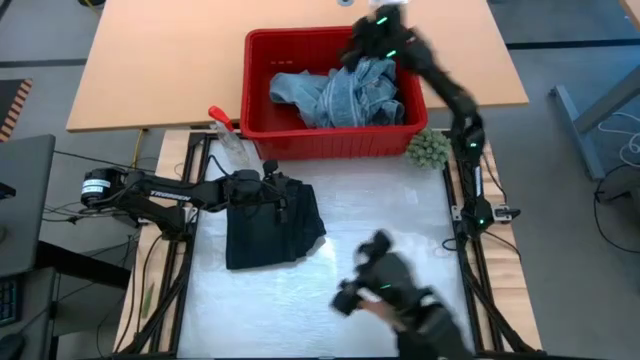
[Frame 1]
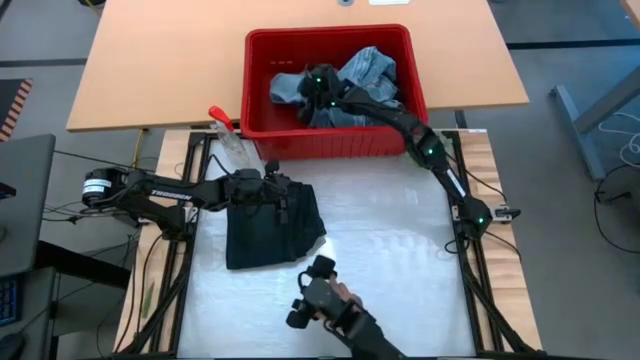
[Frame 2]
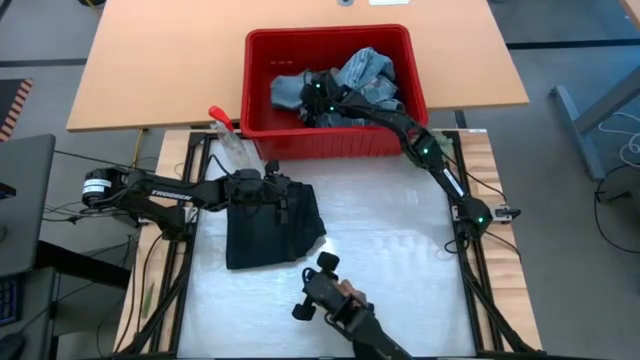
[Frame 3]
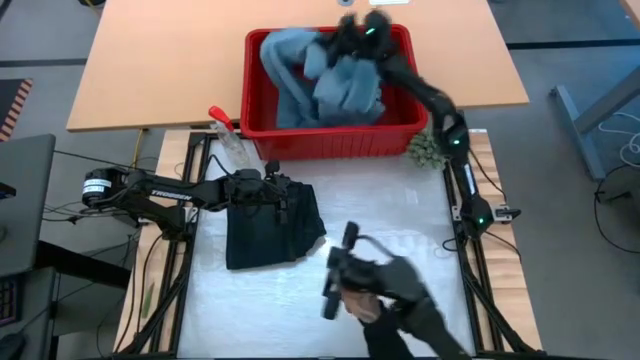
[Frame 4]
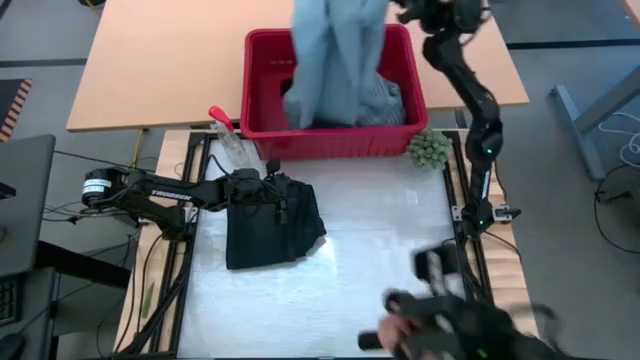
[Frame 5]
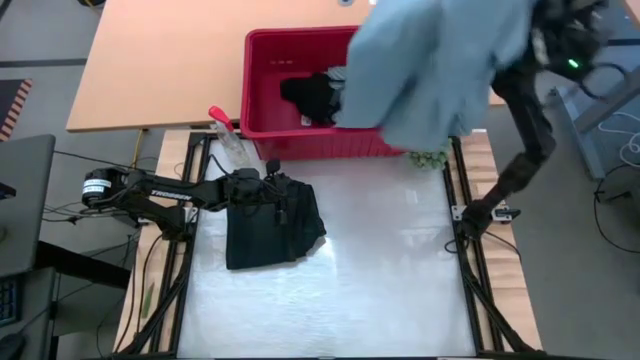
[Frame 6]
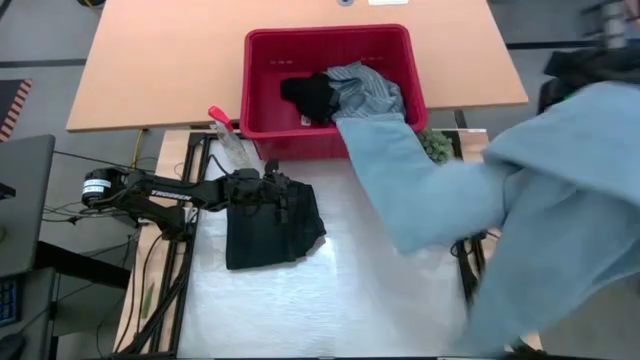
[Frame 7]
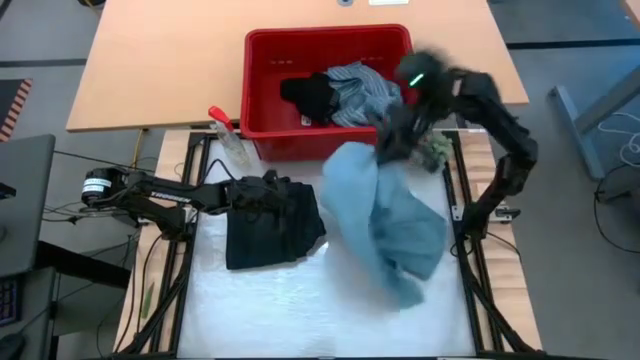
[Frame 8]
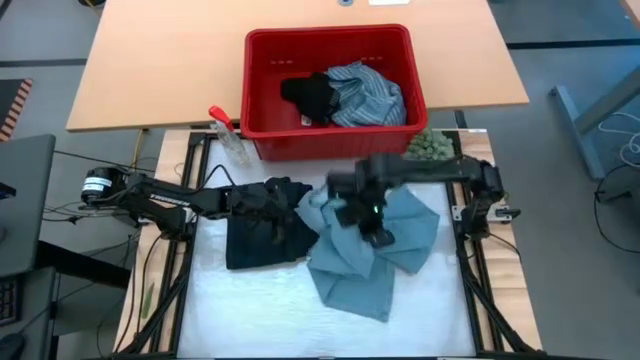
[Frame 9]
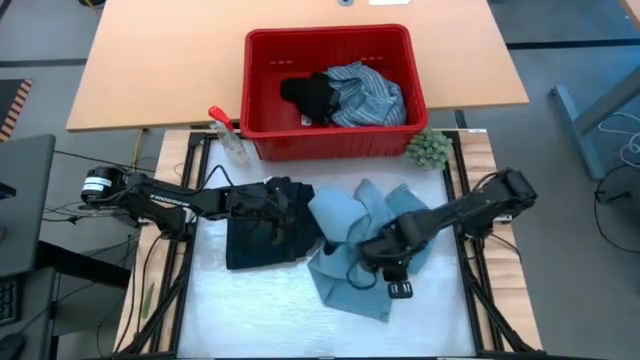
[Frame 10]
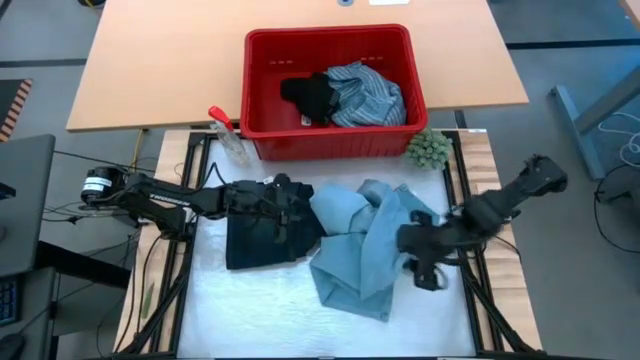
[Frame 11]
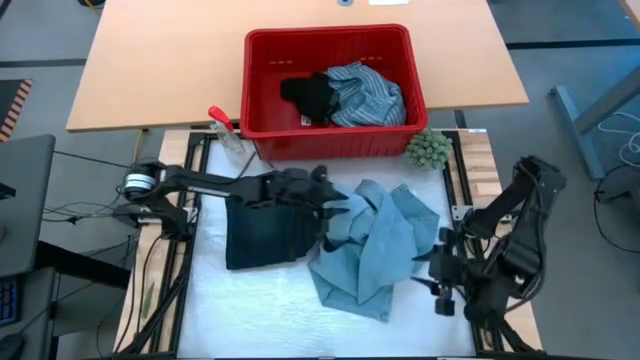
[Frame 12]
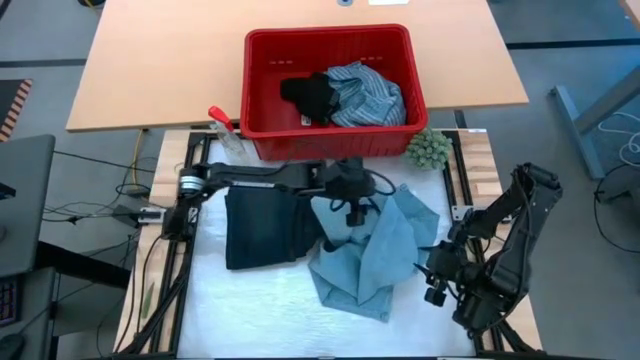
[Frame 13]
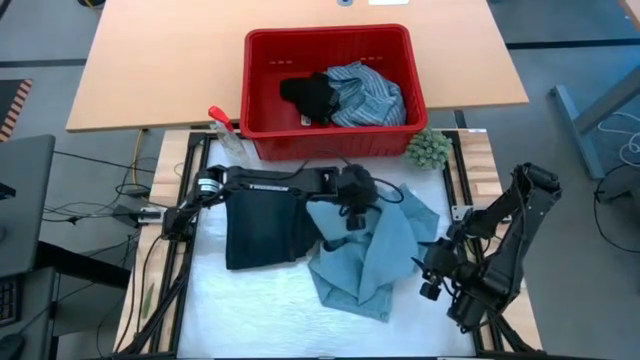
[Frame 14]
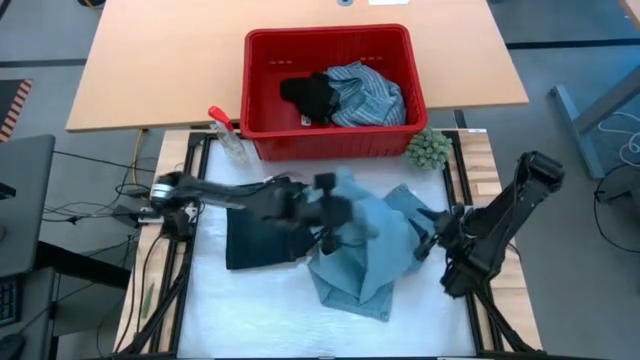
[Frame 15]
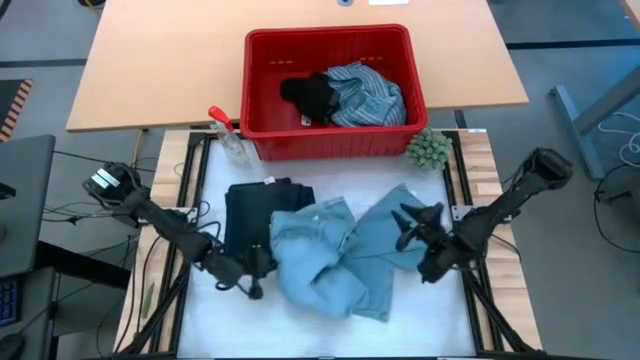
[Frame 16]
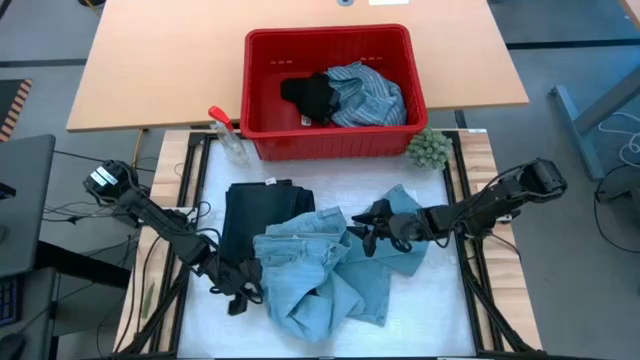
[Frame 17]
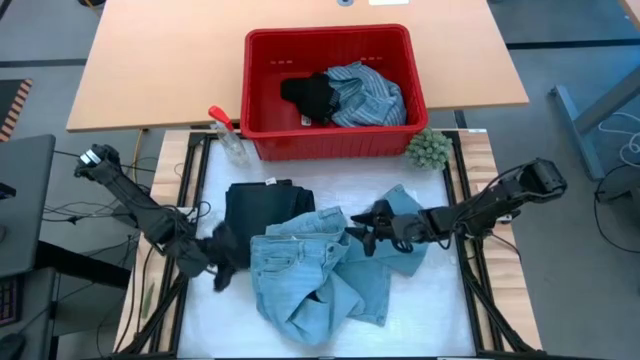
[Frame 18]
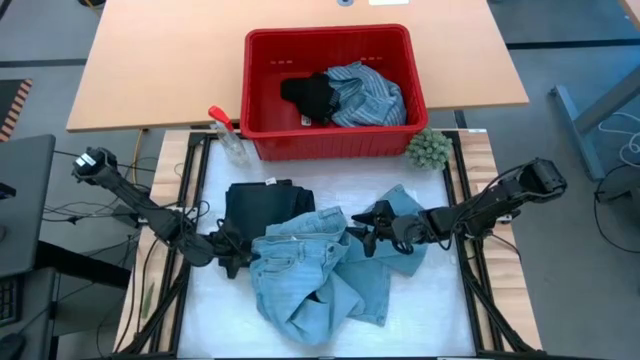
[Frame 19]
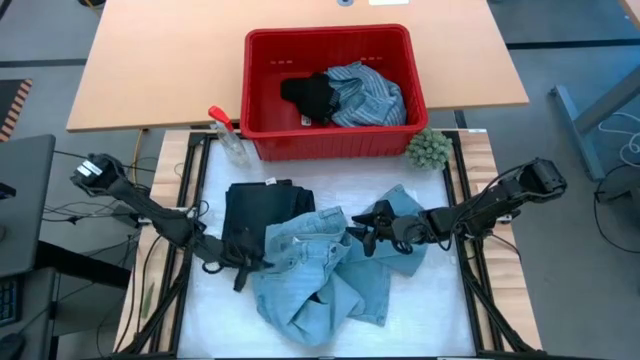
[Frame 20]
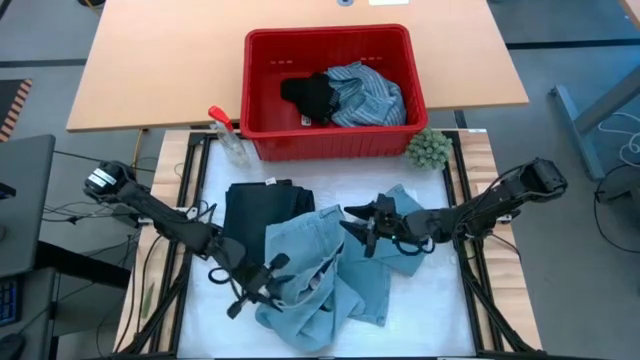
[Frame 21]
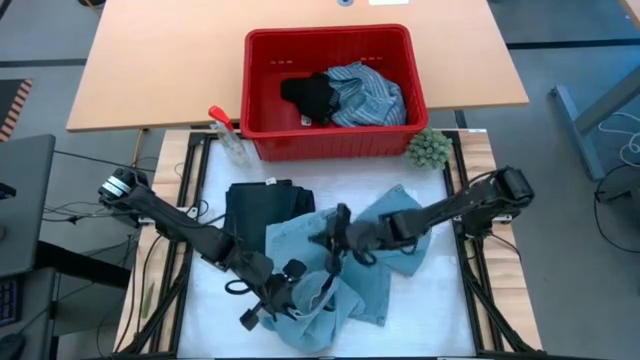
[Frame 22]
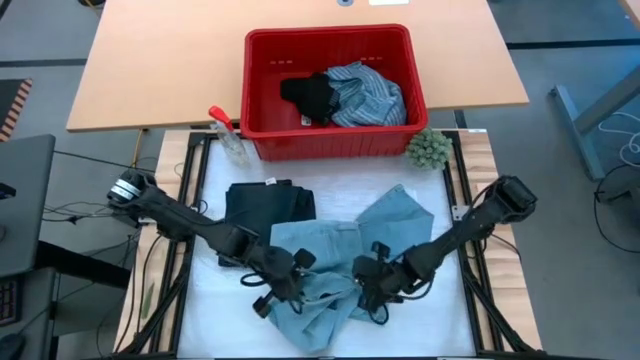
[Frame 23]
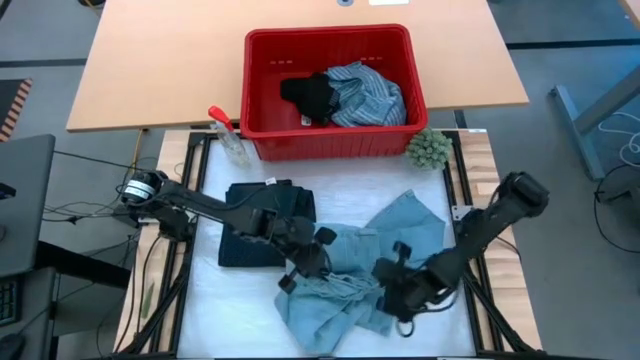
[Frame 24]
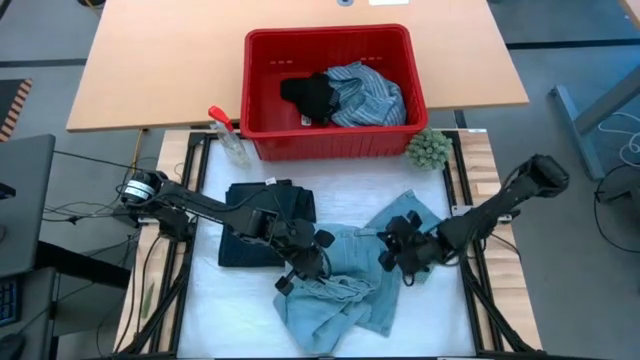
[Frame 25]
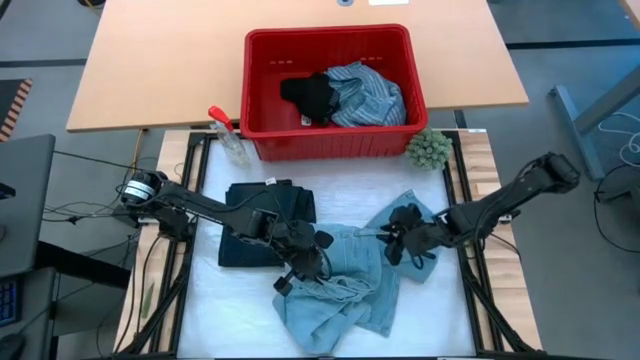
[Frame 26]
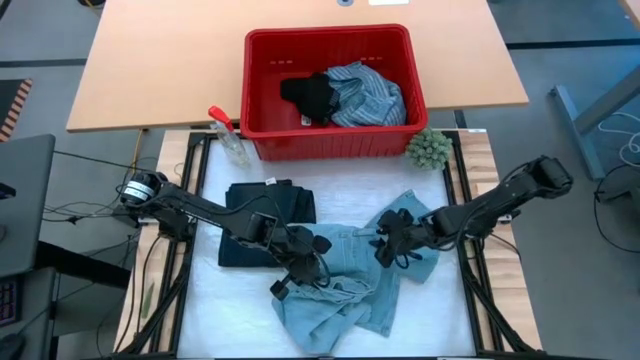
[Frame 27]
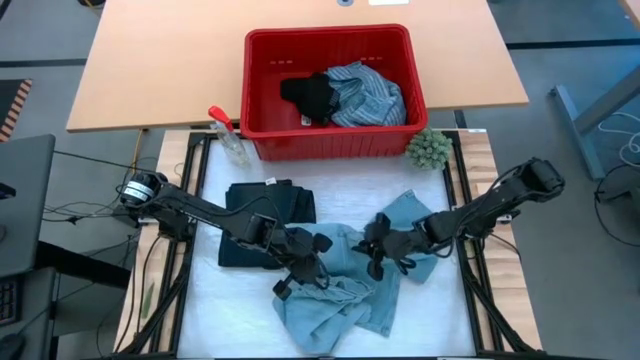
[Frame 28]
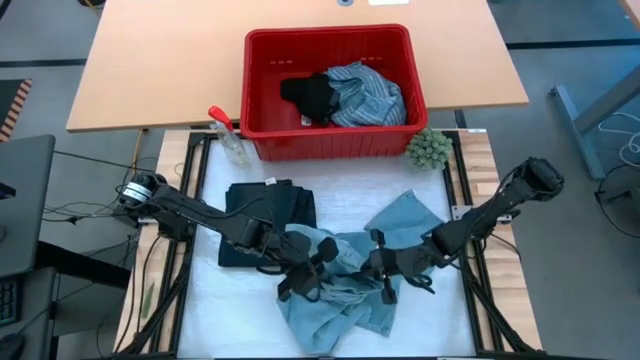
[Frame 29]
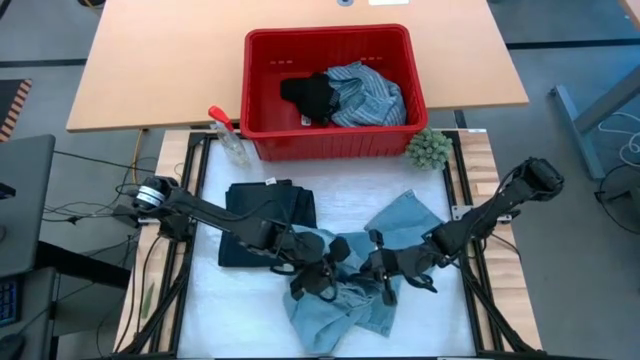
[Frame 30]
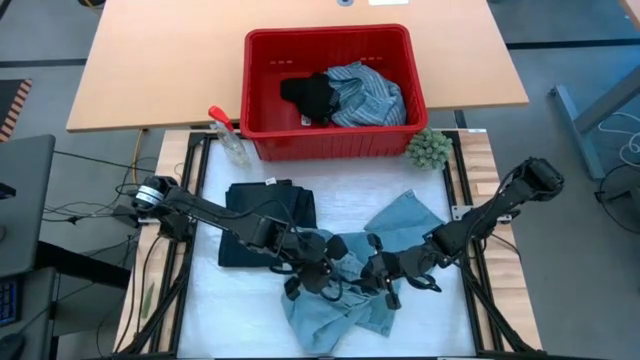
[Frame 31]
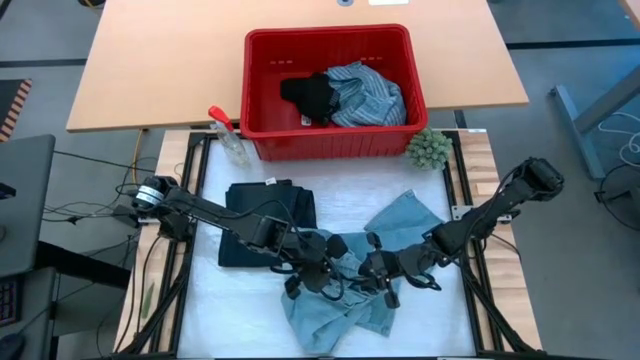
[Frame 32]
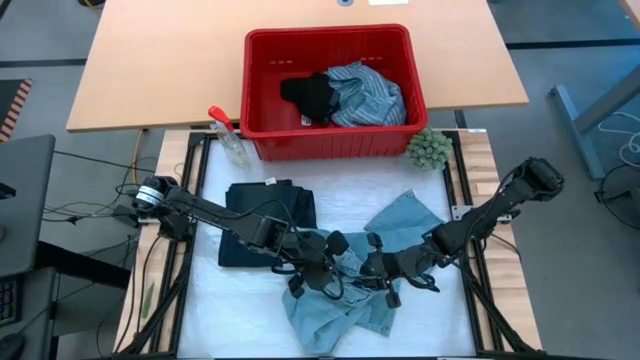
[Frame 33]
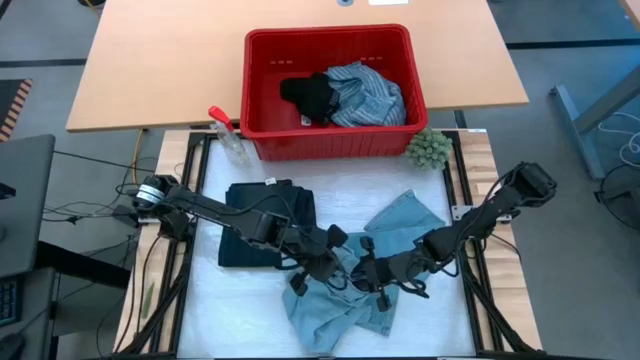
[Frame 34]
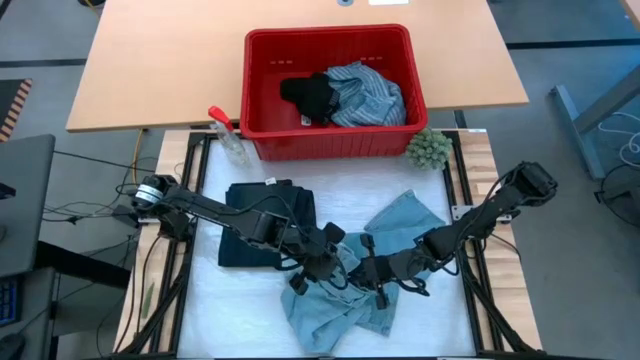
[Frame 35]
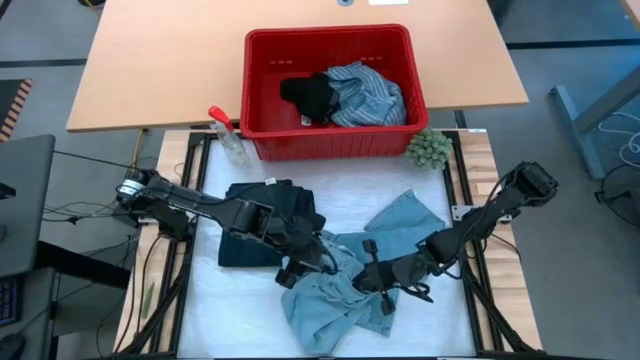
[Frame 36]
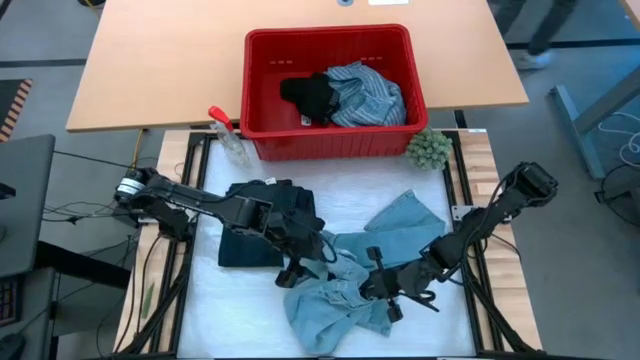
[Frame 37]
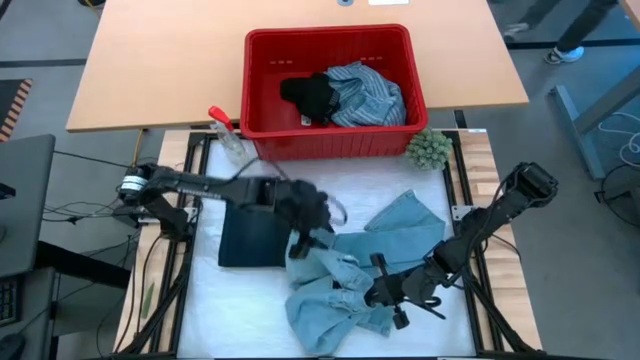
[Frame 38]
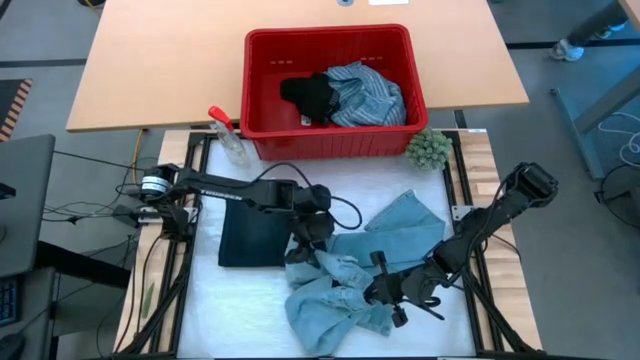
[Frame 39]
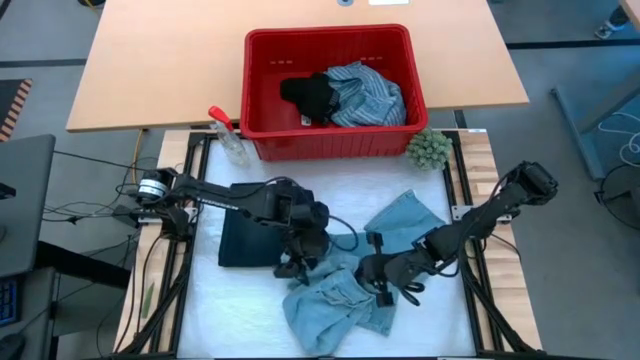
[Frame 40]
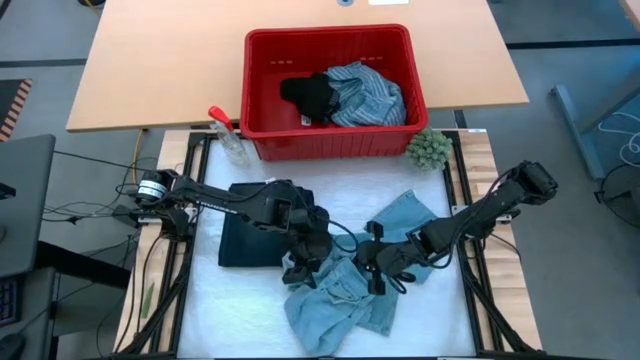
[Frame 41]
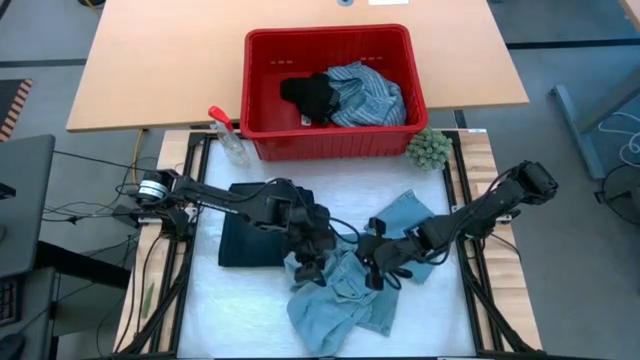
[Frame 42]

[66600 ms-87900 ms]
Task: Fold Laundry from Bin
Fold the light blue pants
